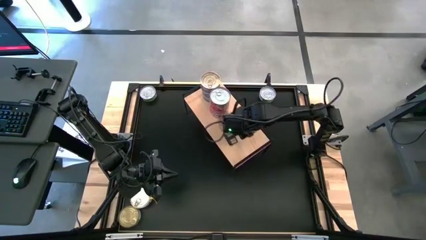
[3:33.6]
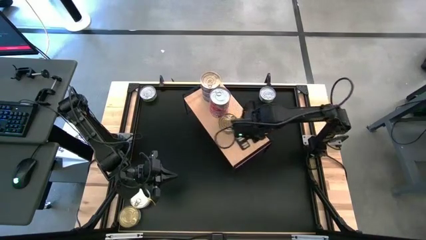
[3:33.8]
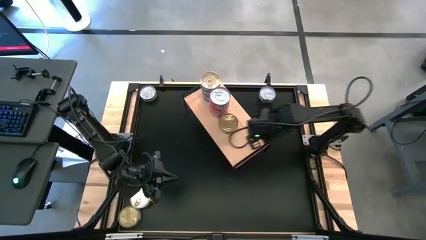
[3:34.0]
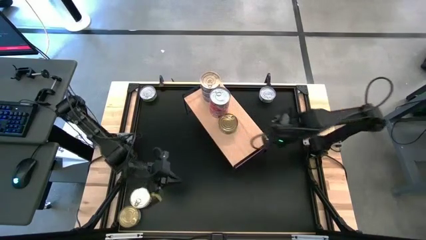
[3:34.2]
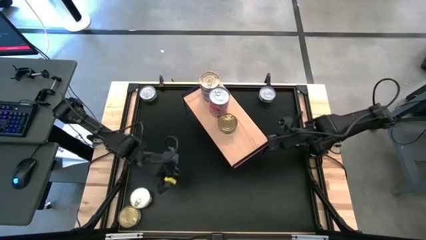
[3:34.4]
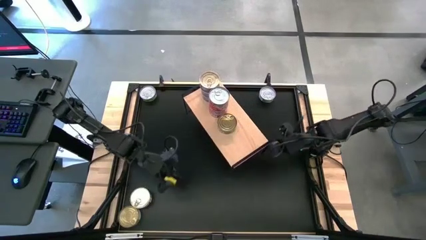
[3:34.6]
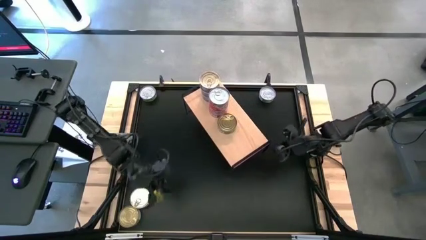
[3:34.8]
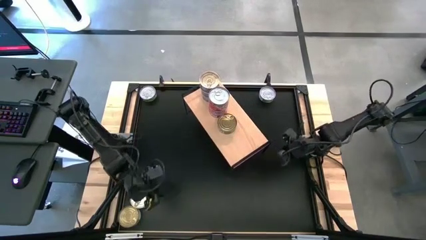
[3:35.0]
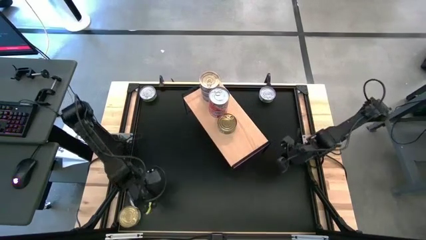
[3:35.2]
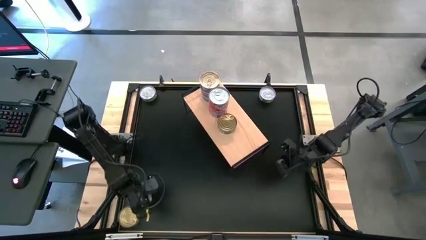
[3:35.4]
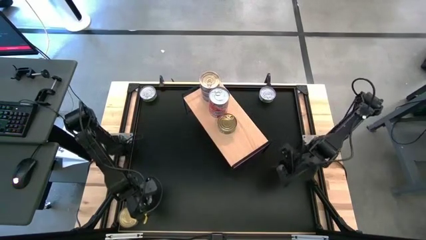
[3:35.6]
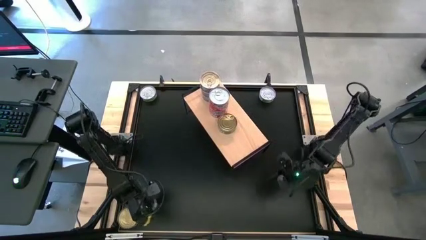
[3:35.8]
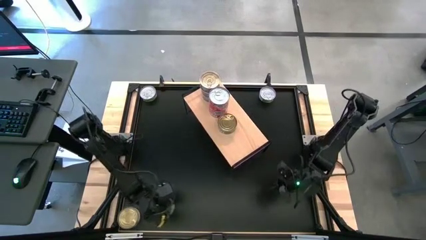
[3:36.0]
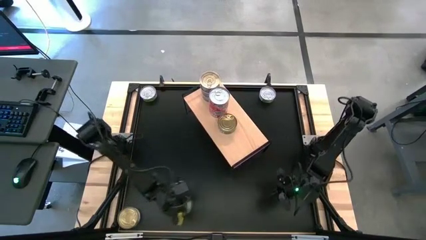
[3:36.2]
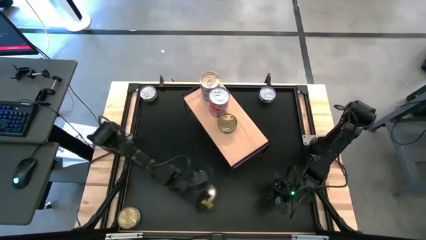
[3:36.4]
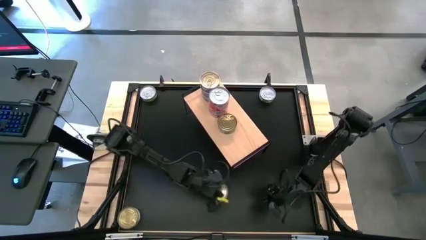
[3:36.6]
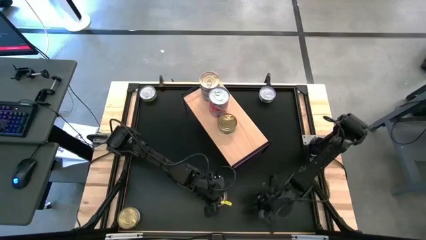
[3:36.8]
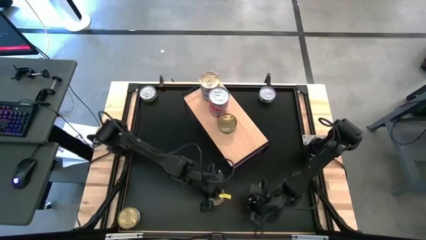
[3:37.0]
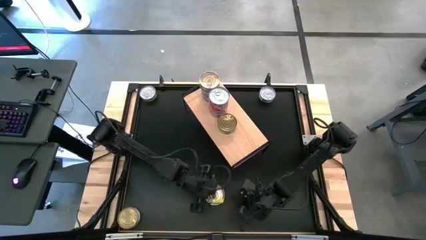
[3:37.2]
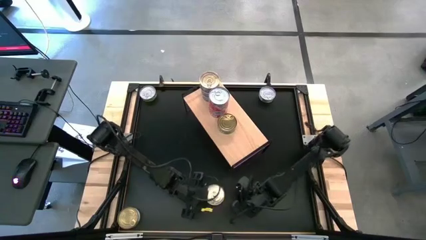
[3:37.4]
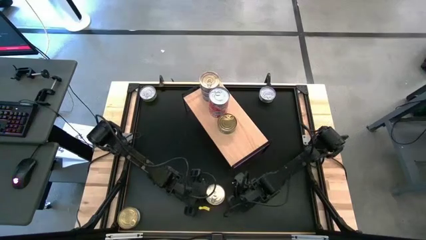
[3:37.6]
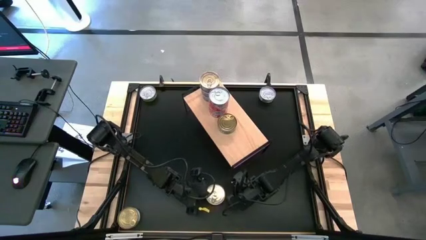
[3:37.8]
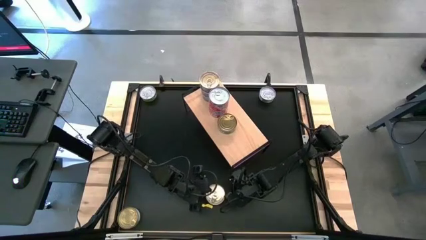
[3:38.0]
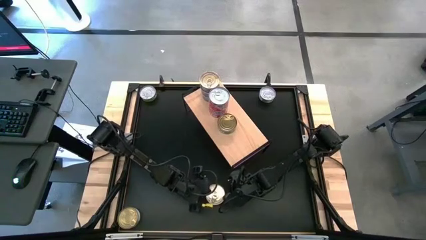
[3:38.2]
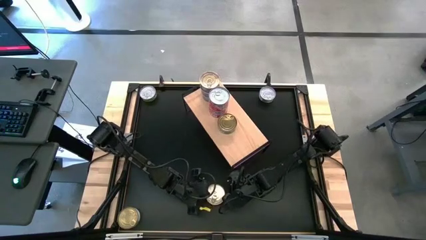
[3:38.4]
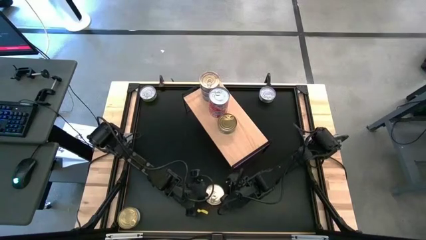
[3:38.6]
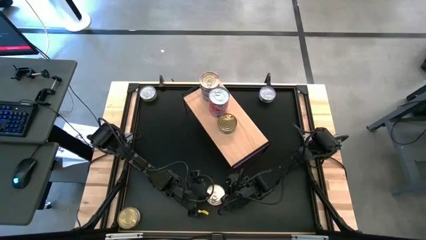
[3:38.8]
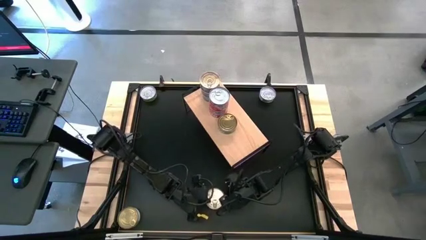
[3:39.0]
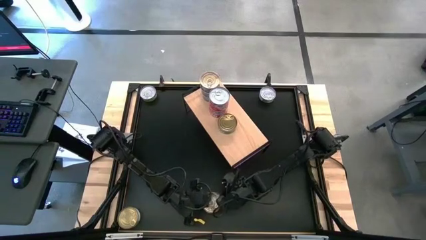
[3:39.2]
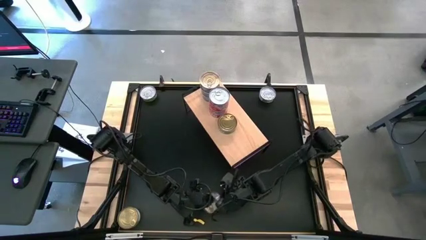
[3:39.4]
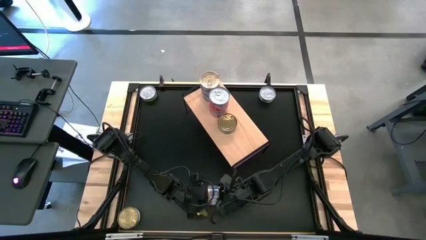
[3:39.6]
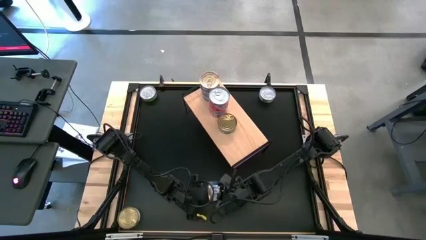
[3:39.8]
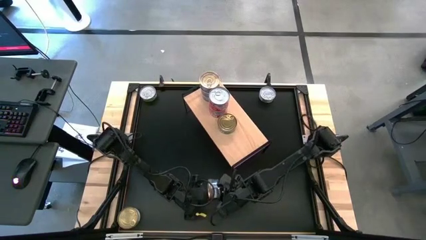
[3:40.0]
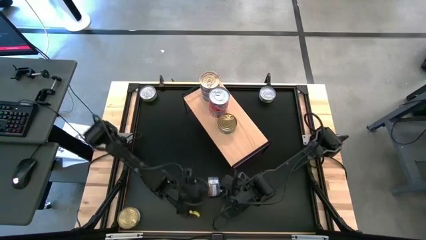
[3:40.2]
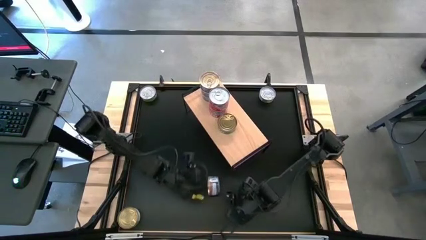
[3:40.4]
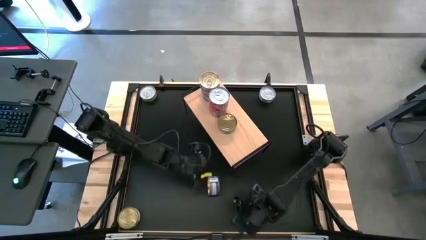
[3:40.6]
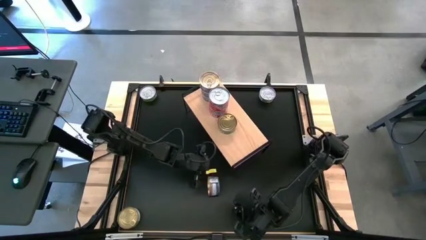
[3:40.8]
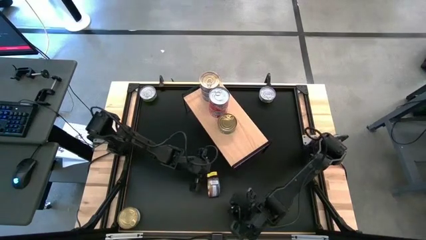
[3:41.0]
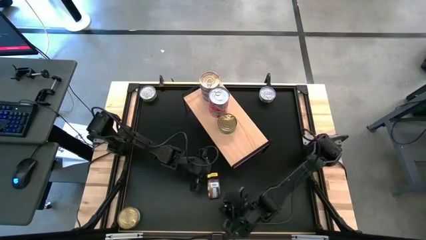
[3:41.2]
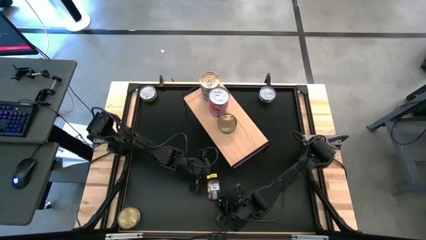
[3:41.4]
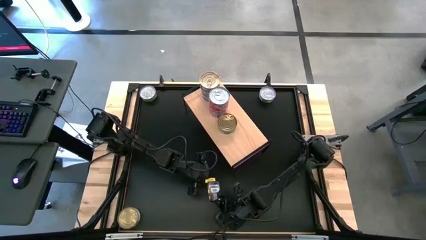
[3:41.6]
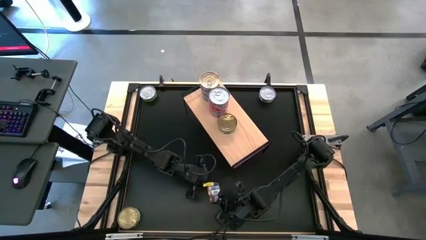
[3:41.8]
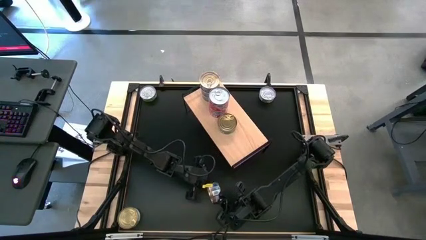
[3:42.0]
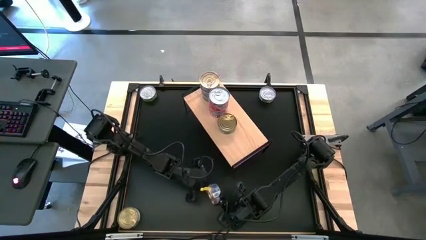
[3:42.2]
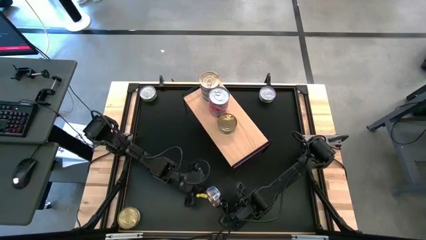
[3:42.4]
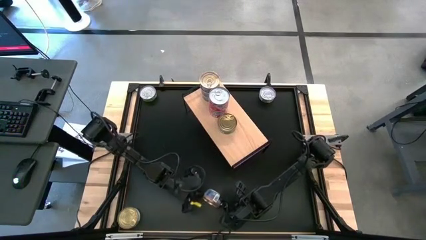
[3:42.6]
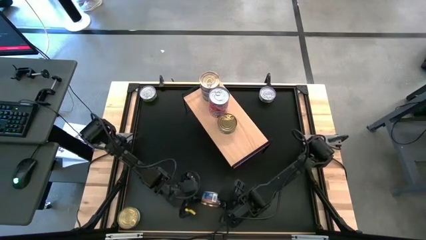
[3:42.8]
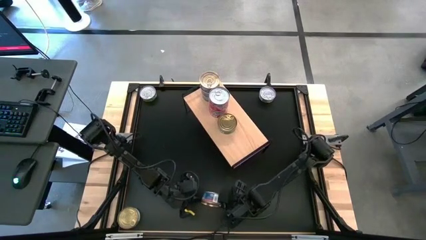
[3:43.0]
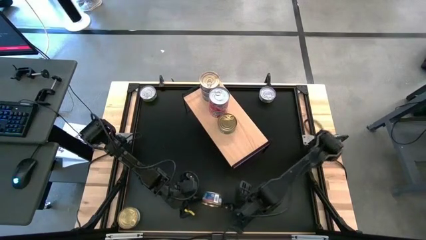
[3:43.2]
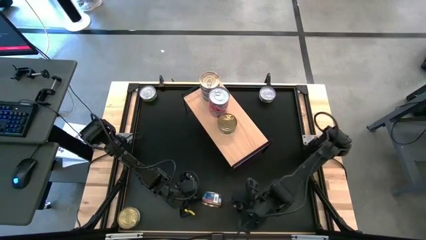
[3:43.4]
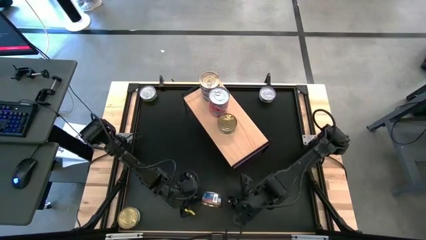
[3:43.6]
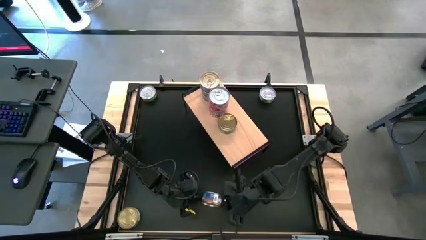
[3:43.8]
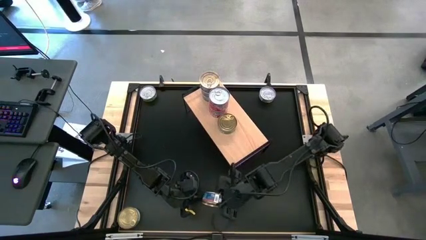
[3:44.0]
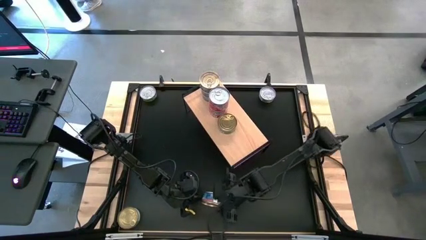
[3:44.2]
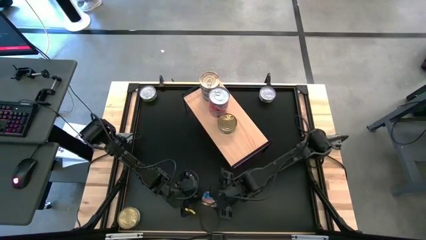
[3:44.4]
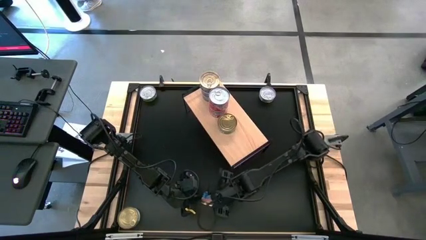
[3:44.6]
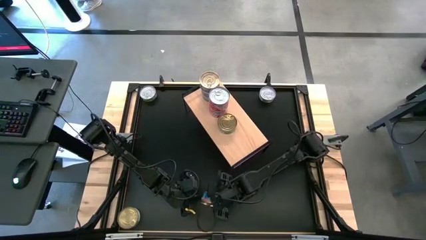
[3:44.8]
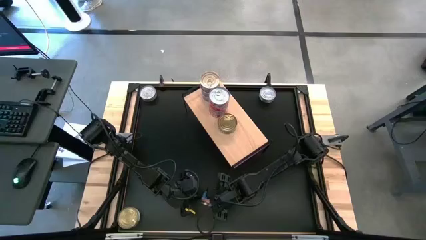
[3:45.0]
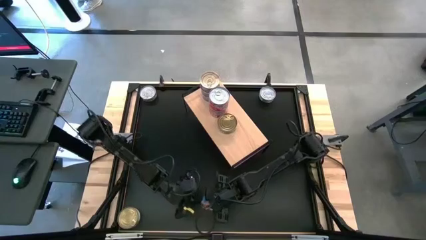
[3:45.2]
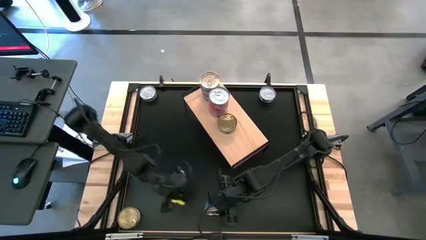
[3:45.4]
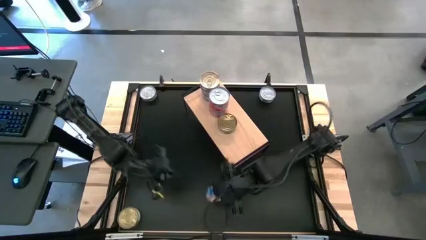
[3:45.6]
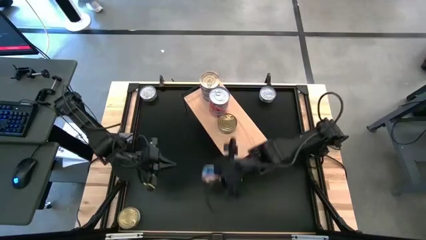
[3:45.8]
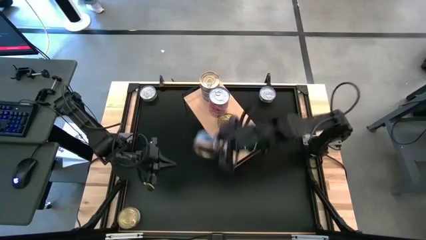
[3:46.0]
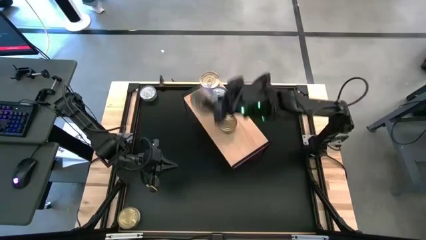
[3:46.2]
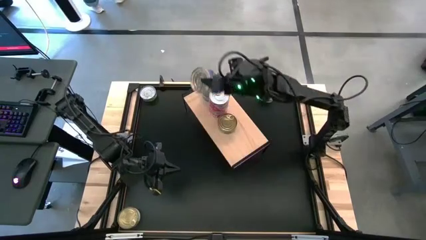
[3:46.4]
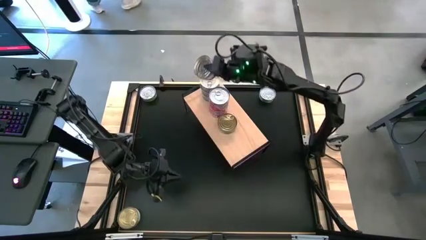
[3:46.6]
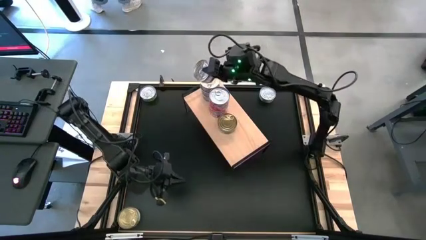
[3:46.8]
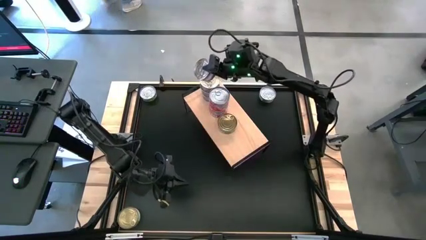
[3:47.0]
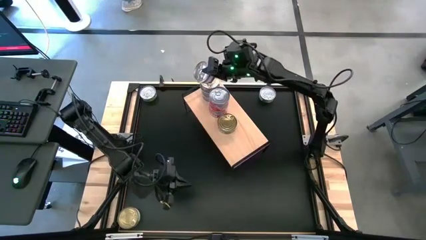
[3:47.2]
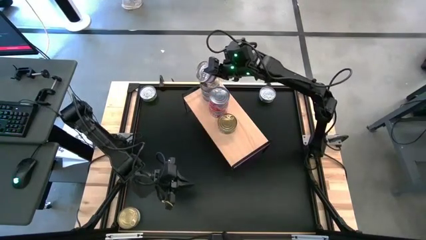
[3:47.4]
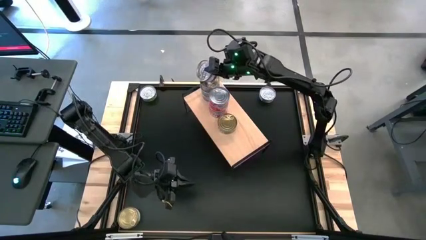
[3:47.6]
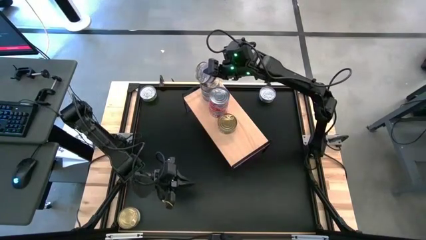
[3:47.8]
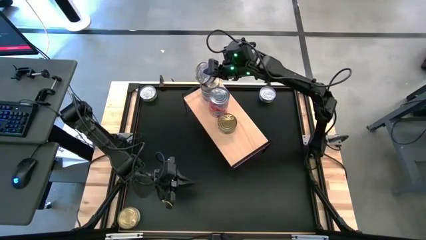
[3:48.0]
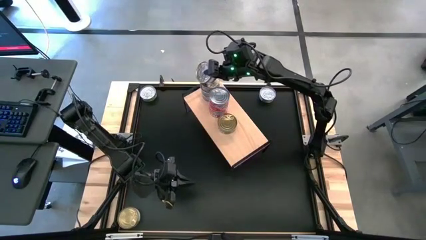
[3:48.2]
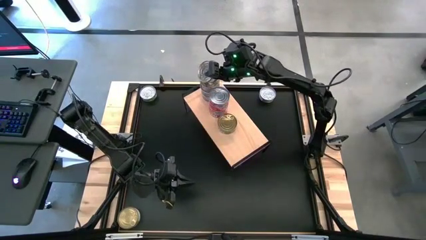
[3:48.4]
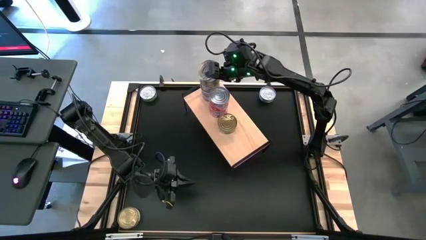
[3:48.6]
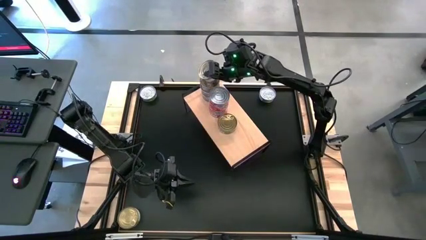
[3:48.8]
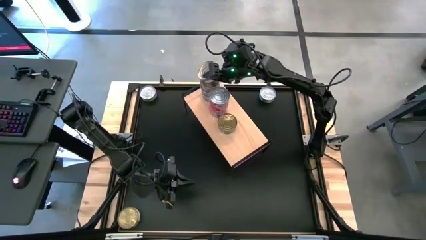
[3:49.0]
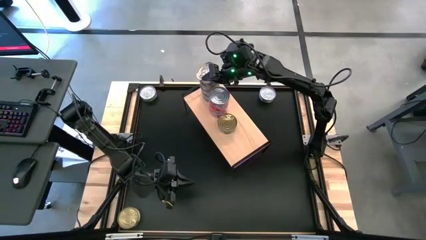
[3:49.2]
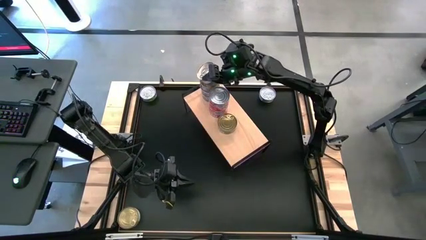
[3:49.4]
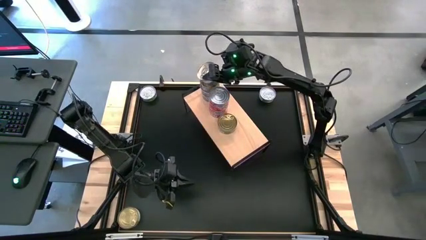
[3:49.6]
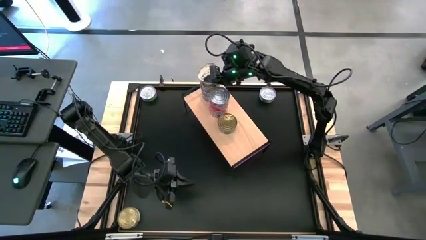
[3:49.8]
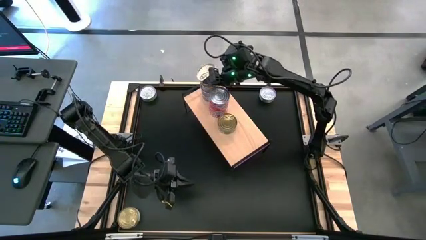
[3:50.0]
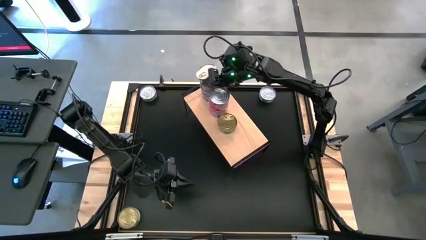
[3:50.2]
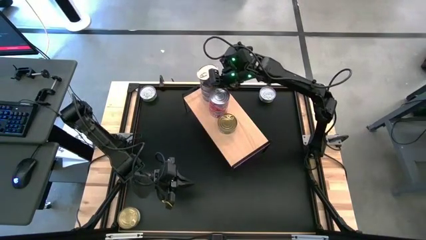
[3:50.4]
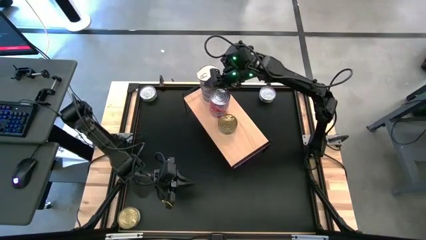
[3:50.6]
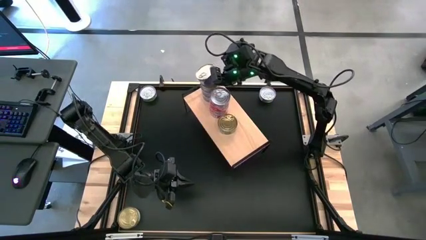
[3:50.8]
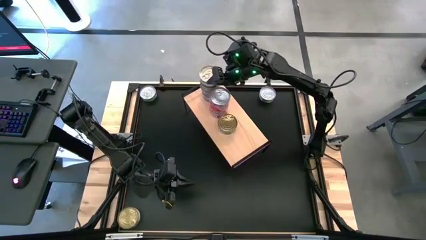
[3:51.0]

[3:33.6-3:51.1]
Task: Stack canned seafood by type on shelf
Stack the blue tuna can on top of blue tuna can on the shelf
